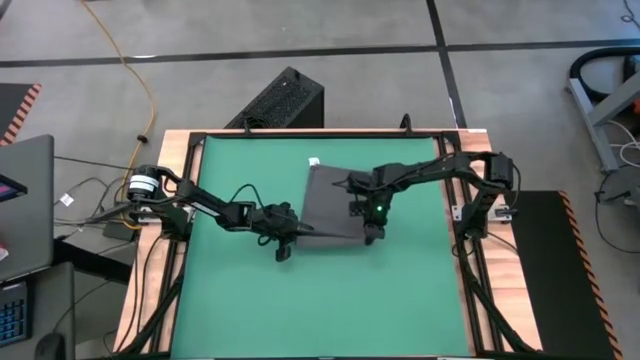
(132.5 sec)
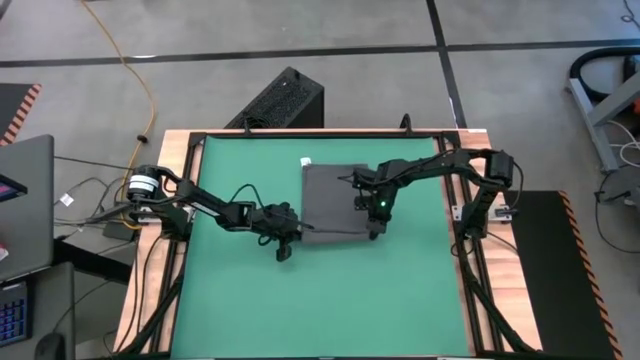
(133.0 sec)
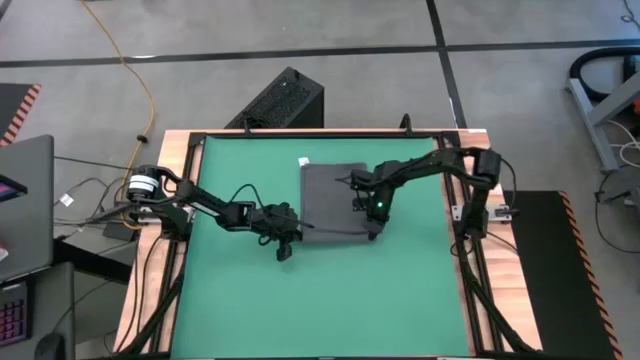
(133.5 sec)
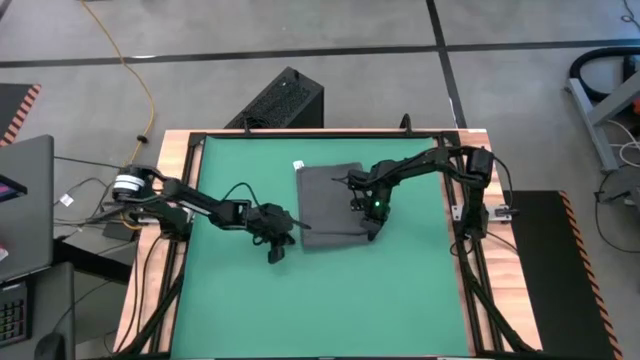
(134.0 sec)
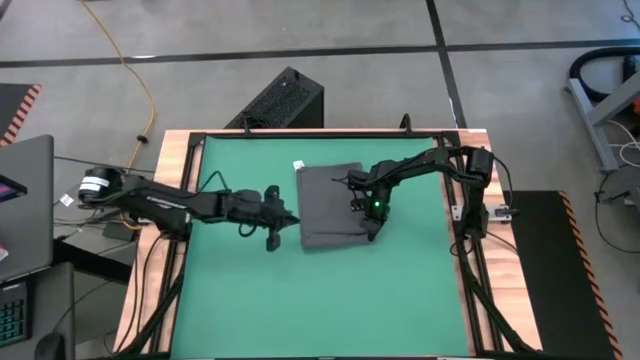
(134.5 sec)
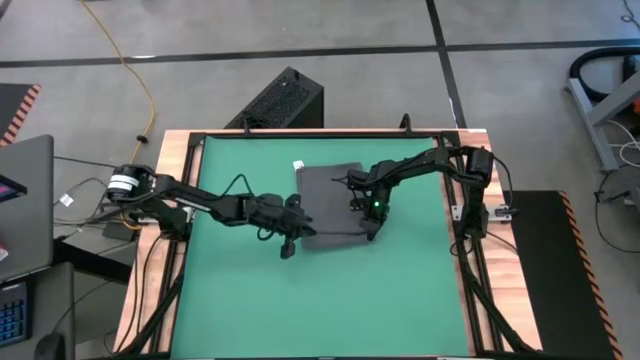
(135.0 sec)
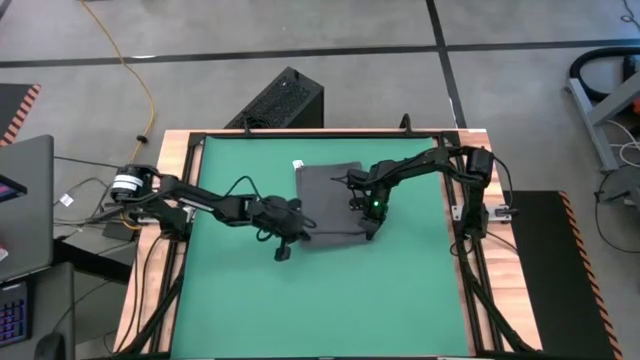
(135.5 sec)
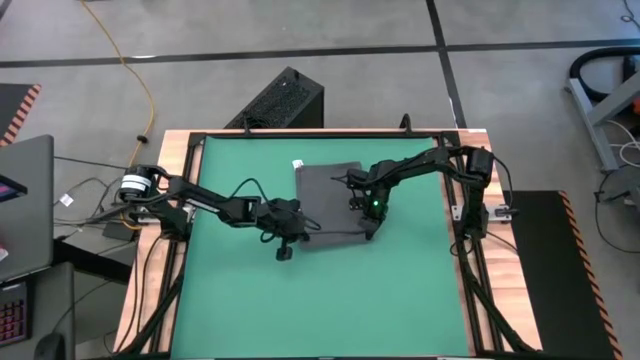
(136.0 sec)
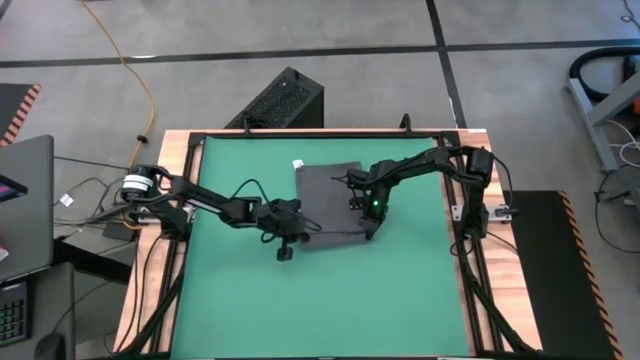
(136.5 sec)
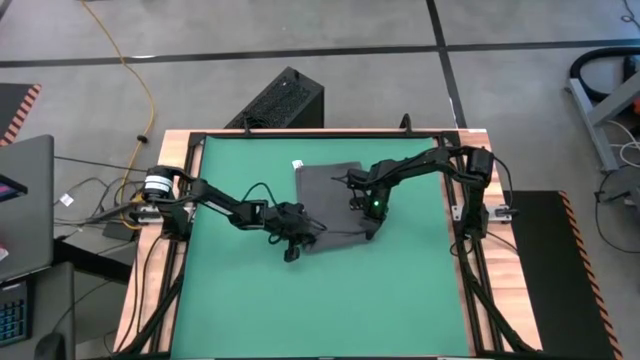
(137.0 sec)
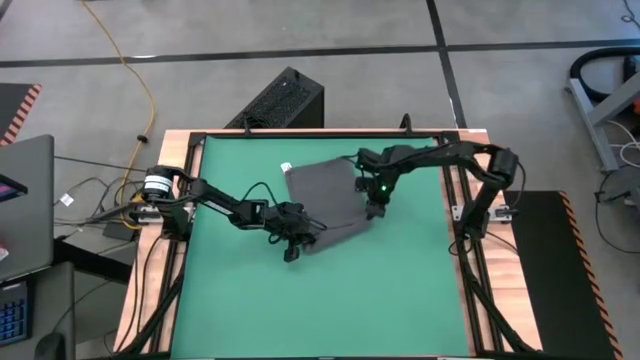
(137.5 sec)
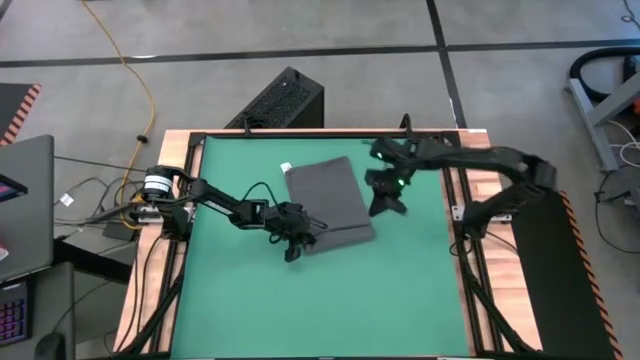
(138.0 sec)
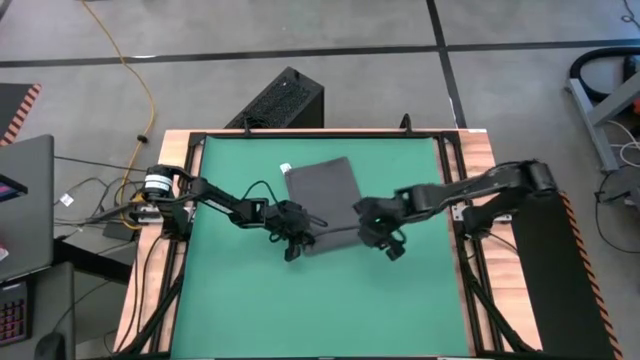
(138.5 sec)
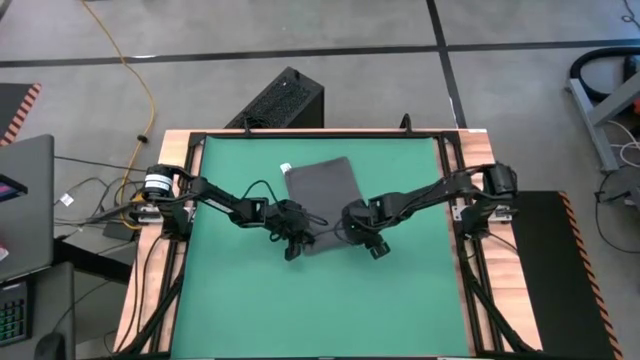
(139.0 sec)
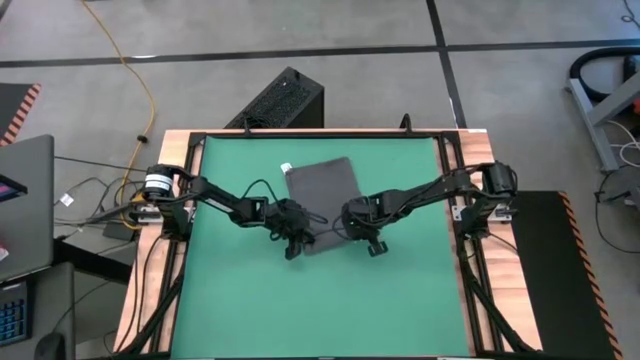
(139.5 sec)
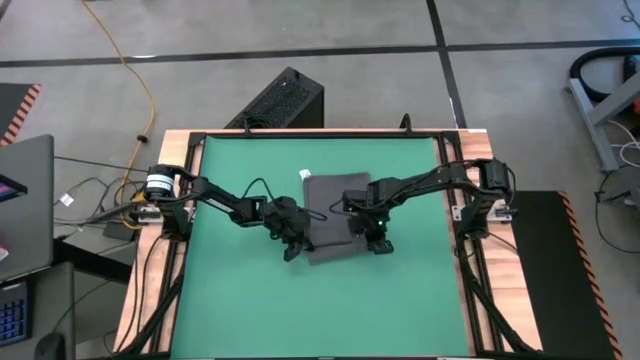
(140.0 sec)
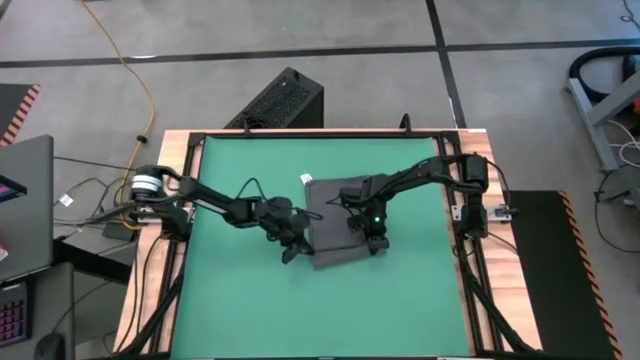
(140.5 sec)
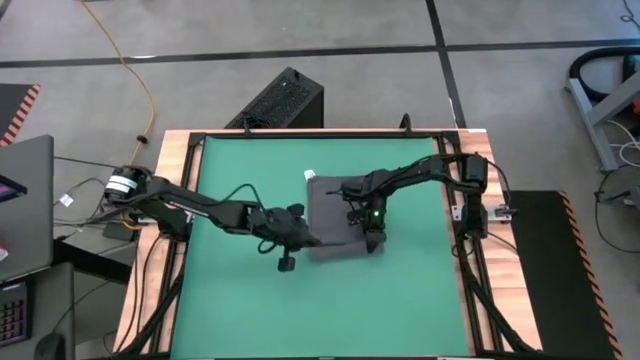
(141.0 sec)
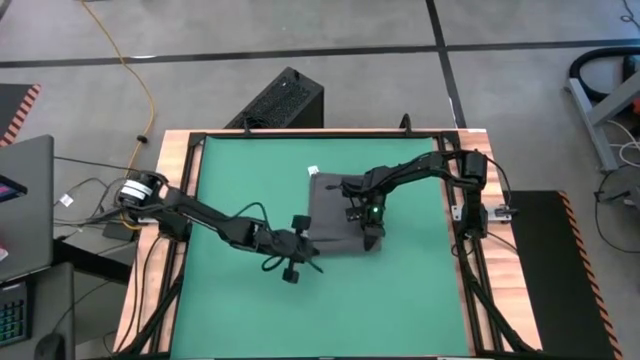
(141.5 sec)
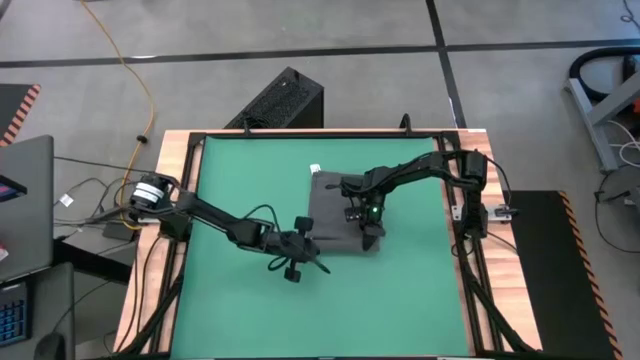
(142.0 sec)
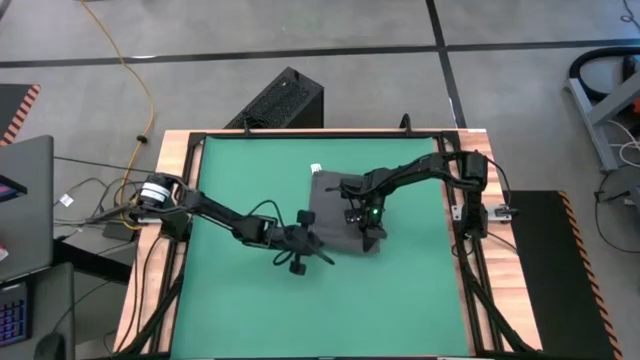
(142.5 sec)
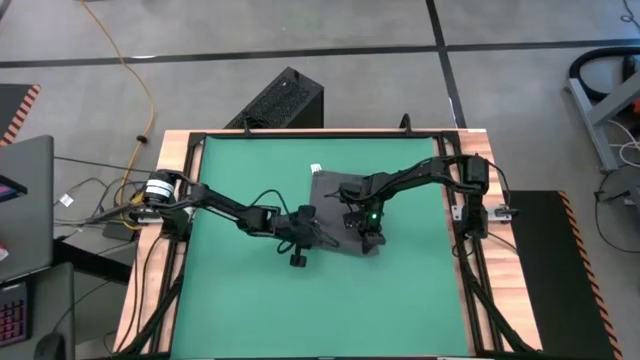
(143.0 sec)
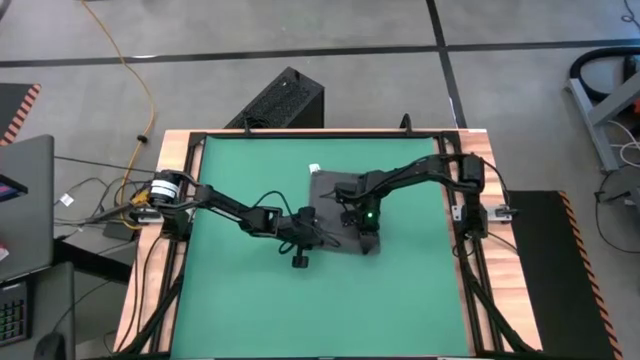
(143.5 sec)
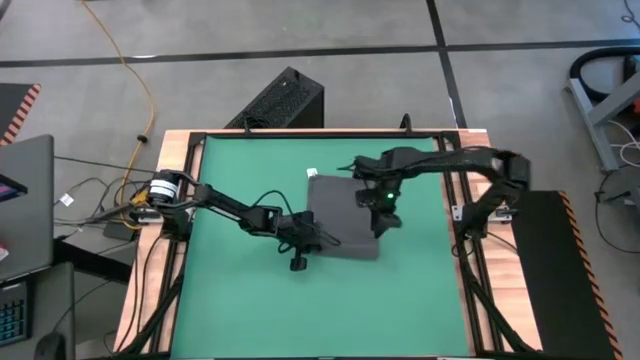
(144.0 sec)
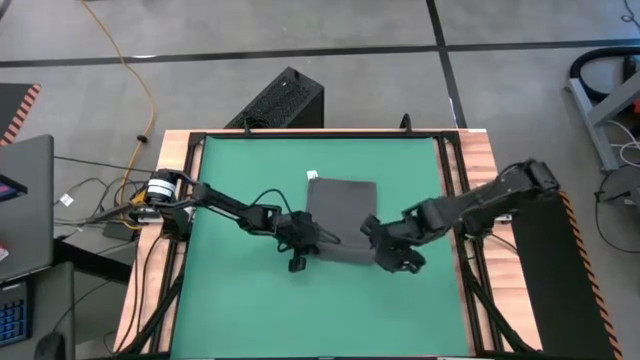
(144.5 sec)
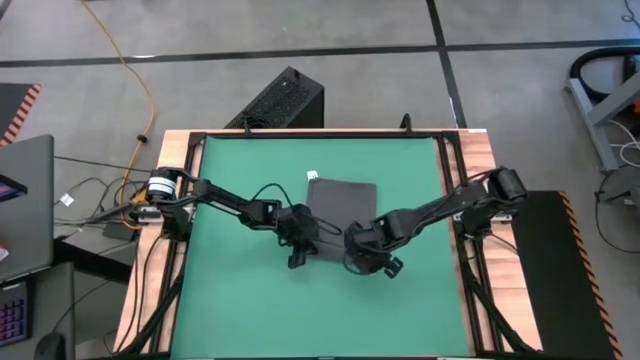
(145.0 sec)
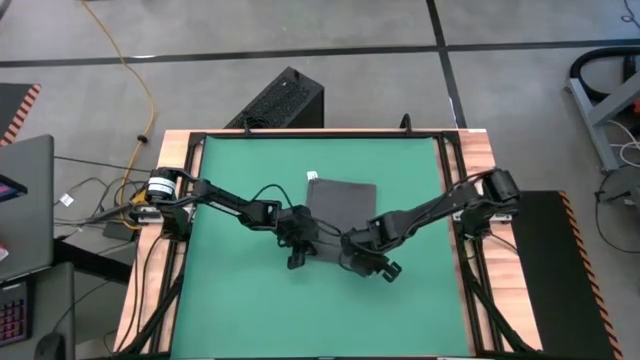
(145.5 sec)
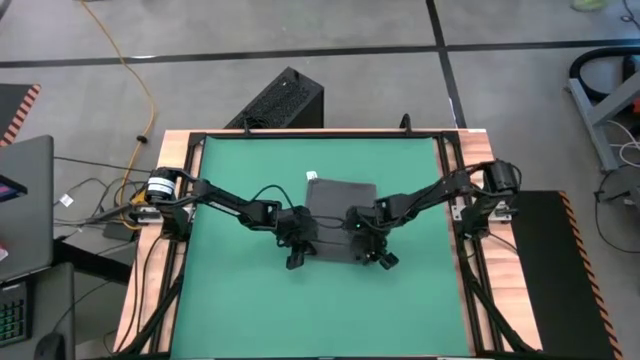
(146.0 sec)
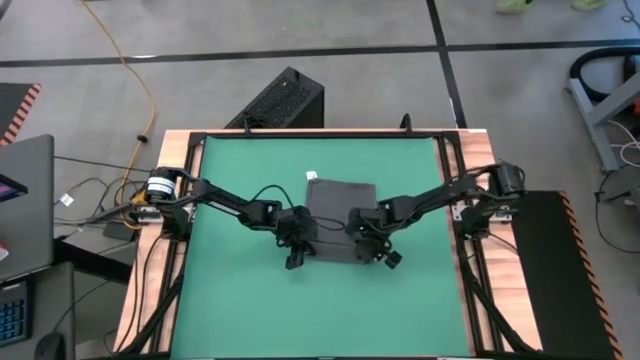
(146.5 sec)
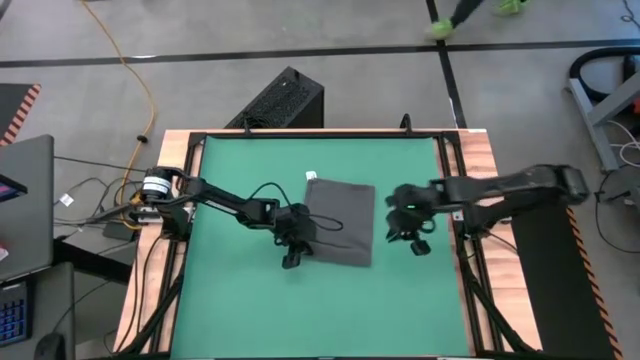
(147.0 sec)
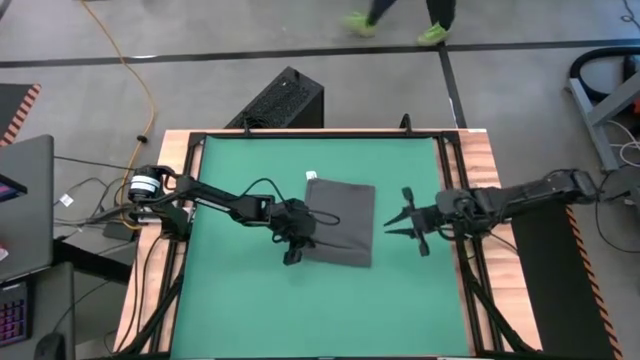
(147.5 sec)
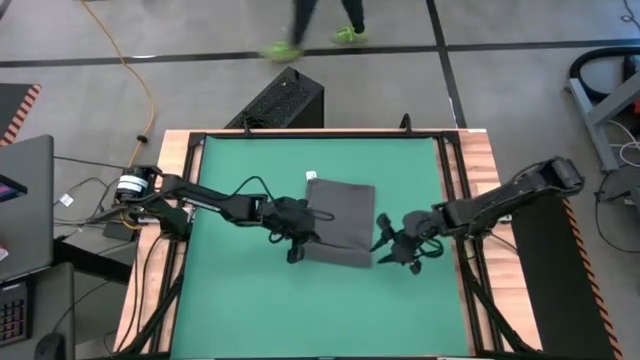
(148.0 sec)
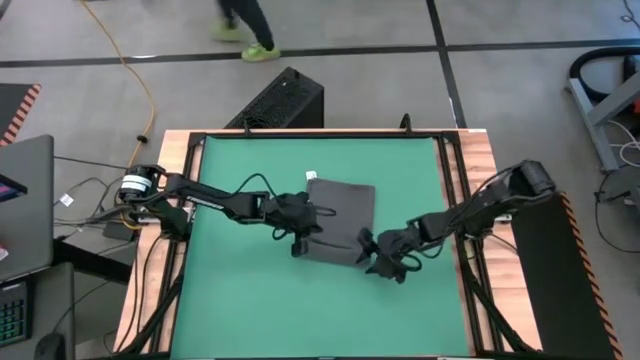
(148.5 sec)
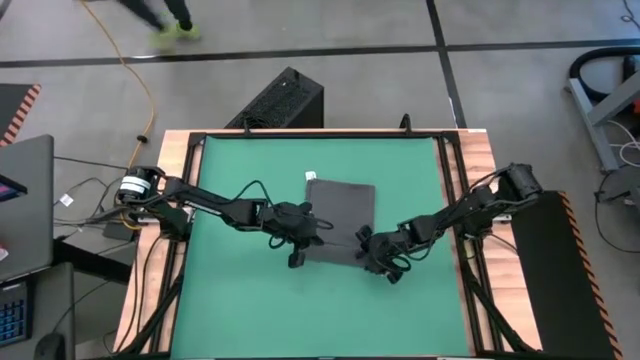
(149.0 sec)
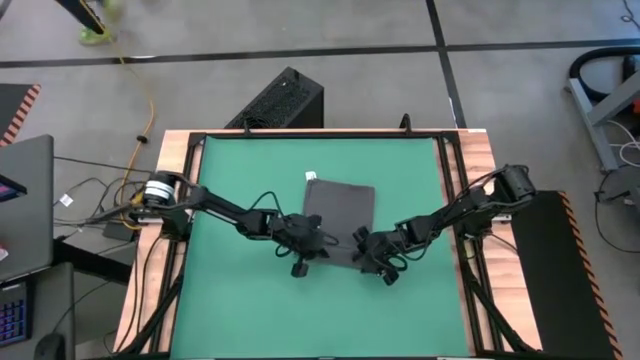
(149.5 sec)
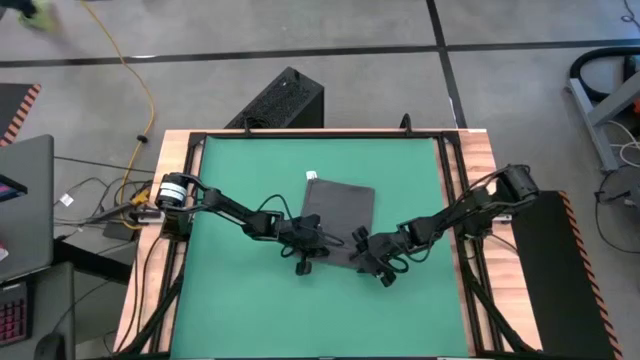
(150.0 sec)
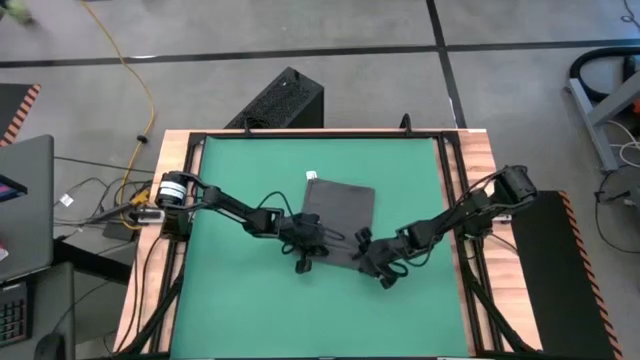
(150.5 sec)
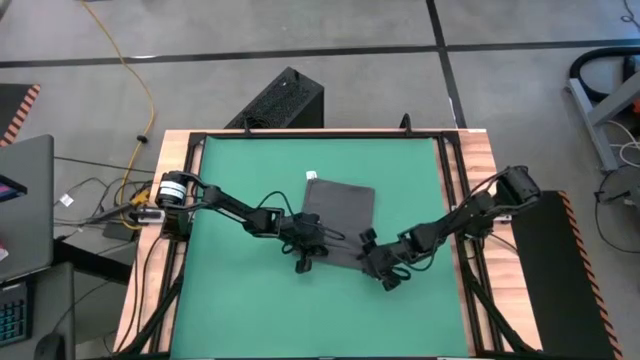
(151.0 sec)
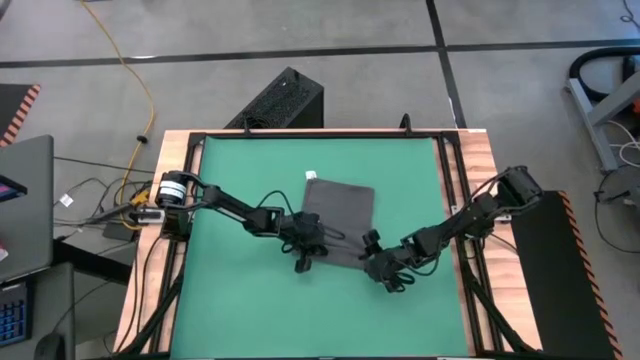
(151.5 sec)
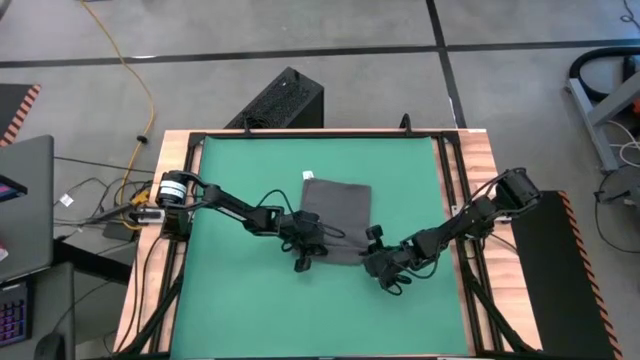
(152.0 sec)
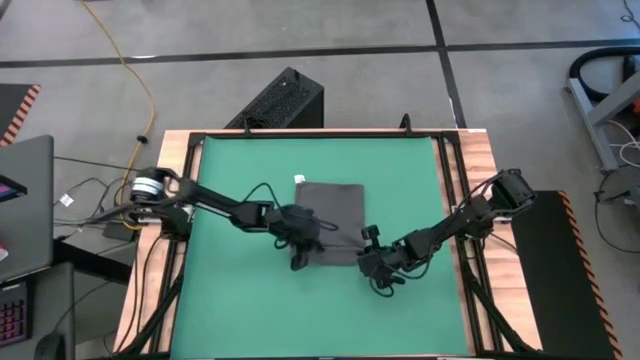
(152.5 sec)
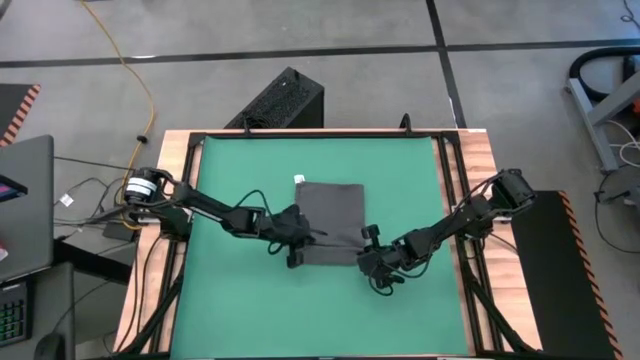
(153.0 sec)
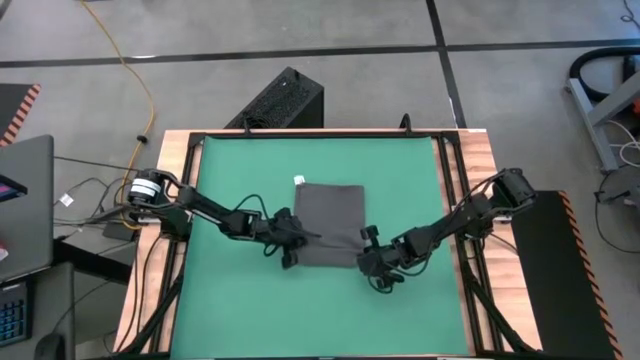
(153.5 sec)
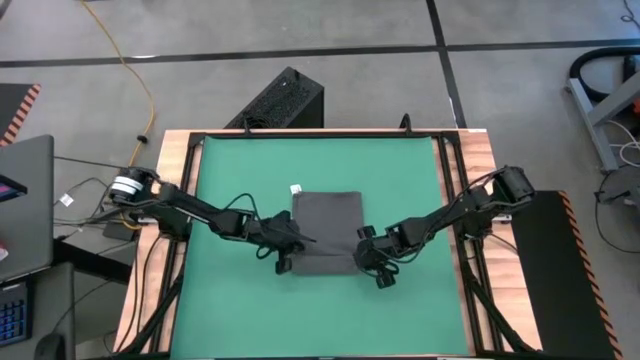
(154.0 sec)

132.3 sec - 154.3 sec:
Task: Roll towel
Roll the microfiber towel
